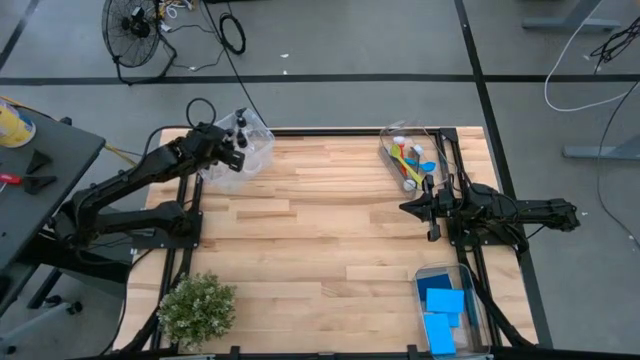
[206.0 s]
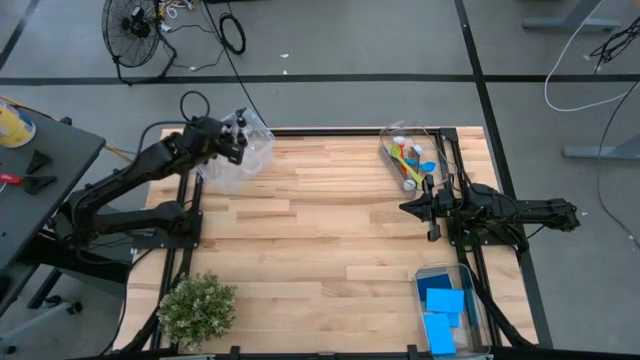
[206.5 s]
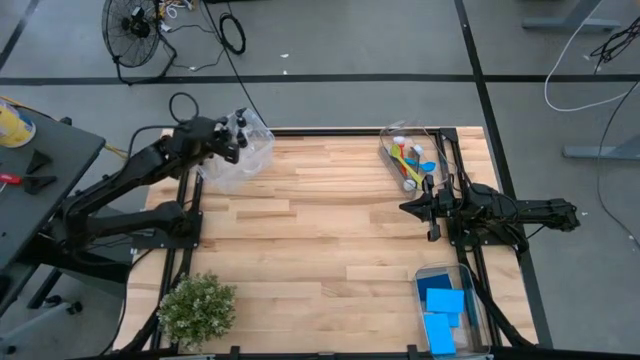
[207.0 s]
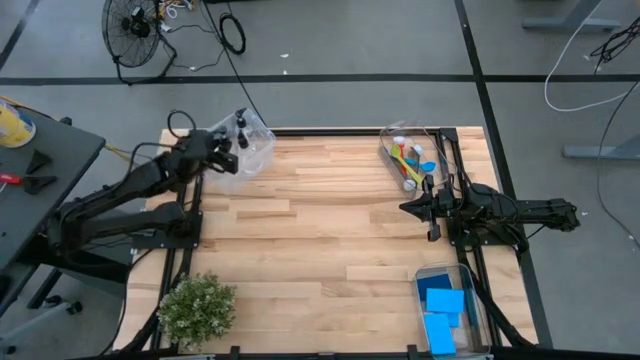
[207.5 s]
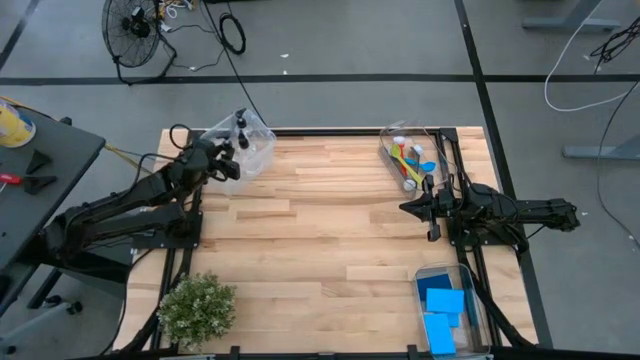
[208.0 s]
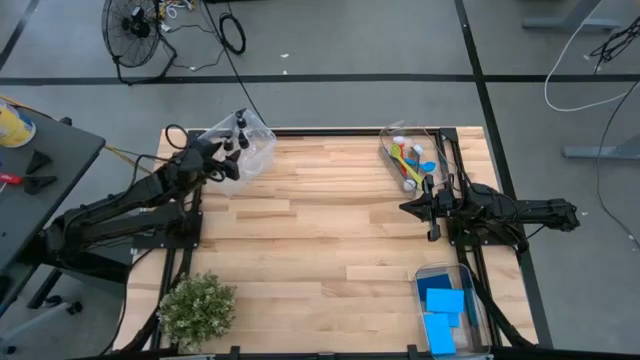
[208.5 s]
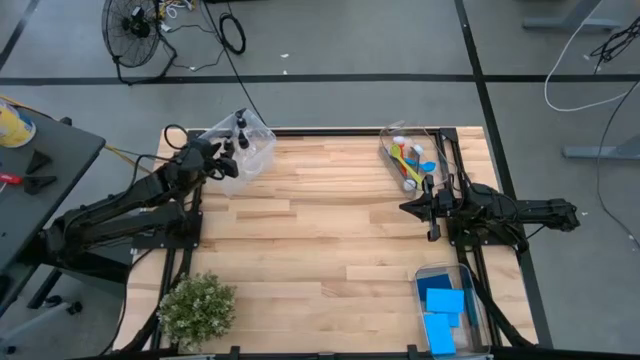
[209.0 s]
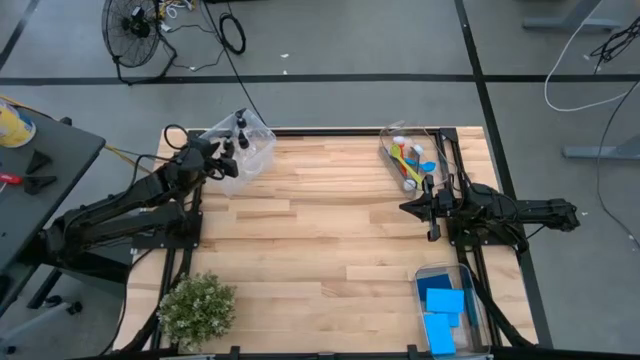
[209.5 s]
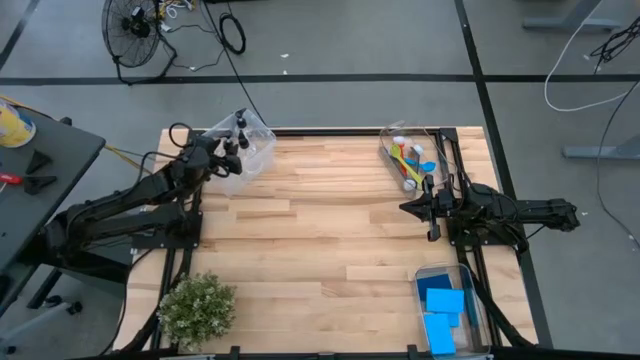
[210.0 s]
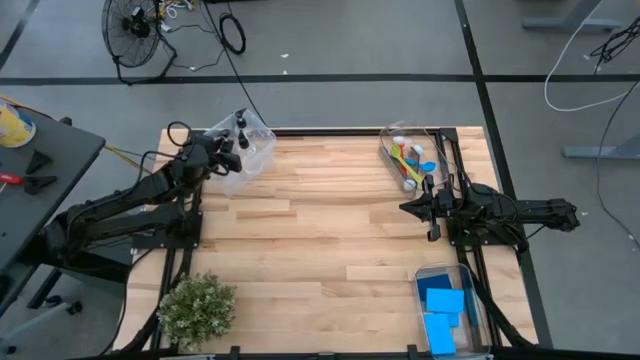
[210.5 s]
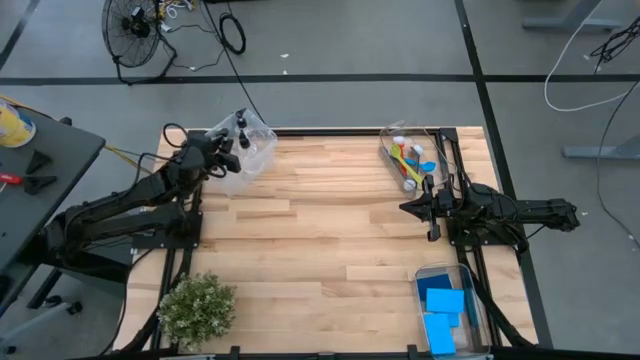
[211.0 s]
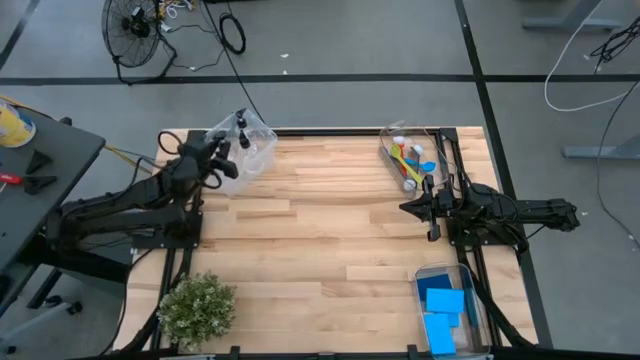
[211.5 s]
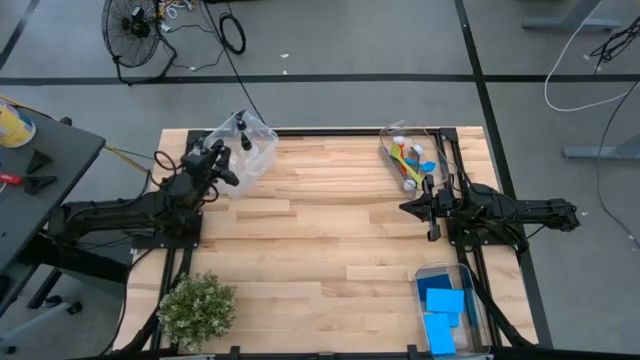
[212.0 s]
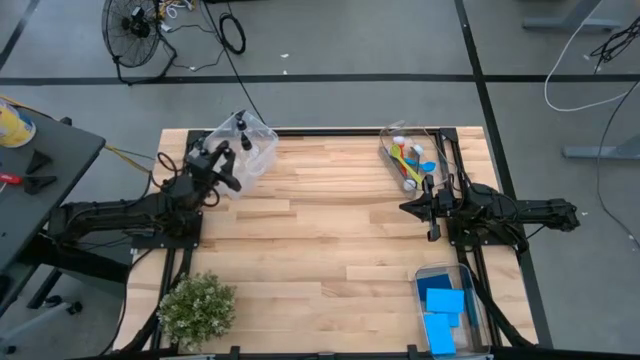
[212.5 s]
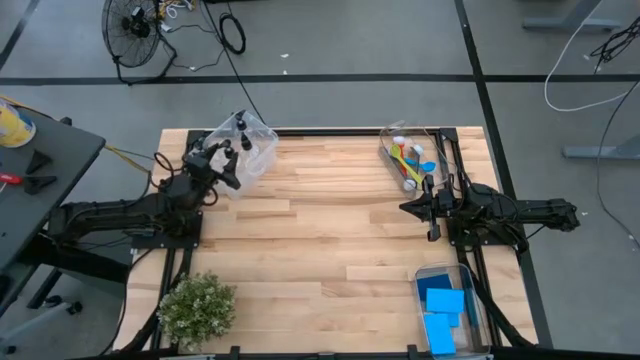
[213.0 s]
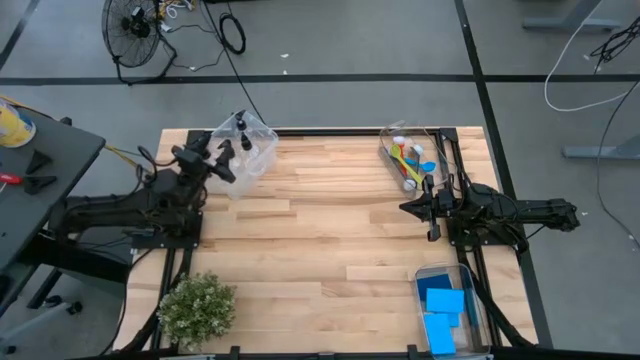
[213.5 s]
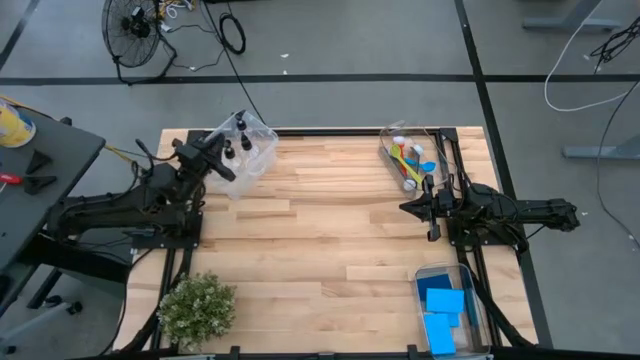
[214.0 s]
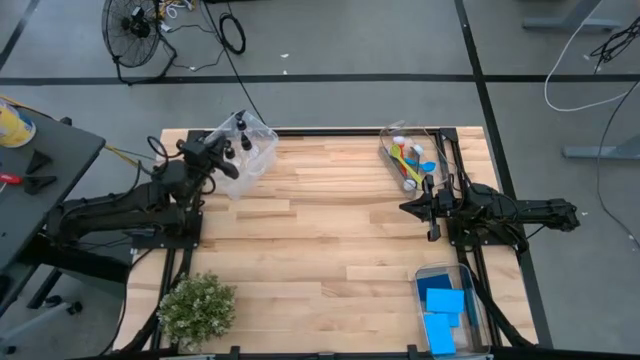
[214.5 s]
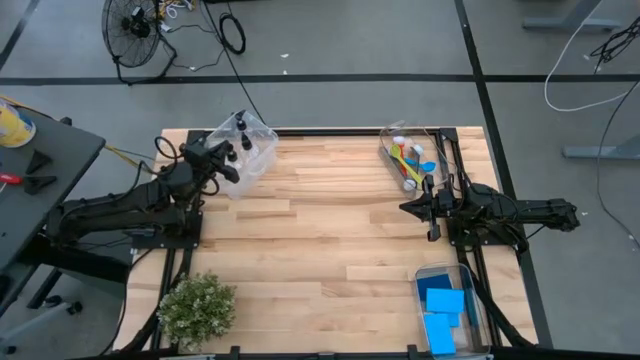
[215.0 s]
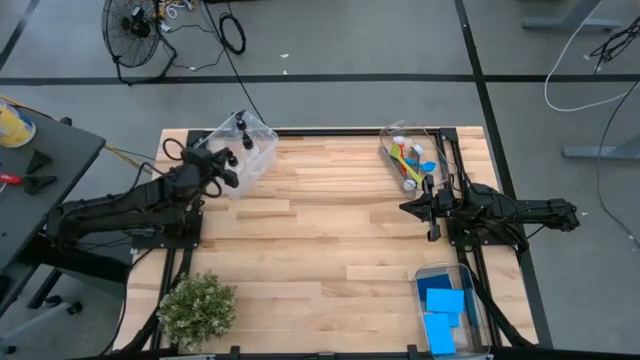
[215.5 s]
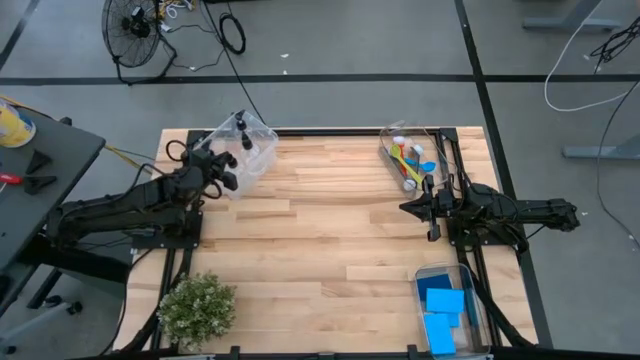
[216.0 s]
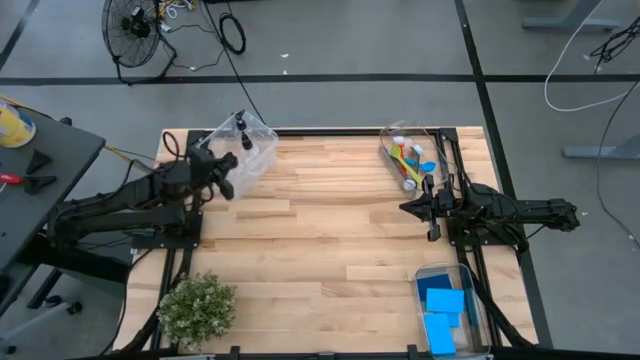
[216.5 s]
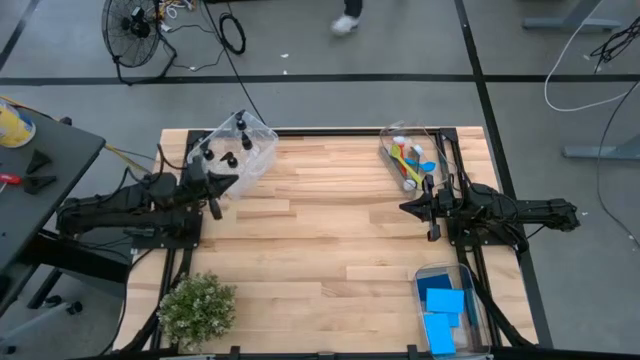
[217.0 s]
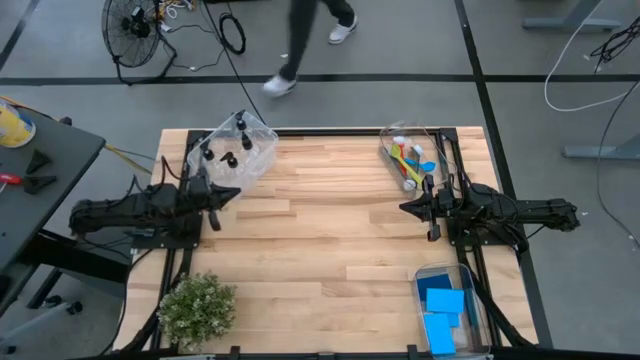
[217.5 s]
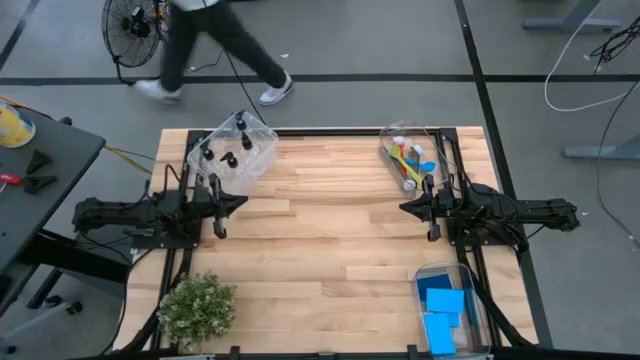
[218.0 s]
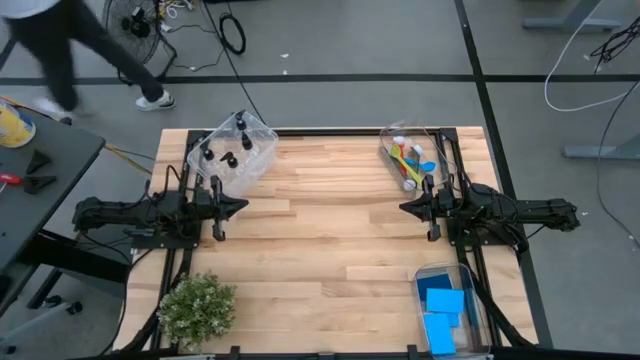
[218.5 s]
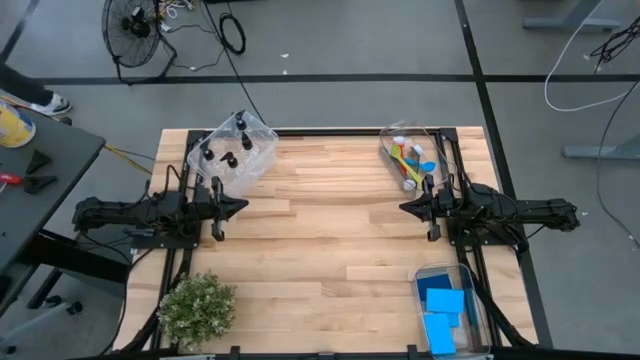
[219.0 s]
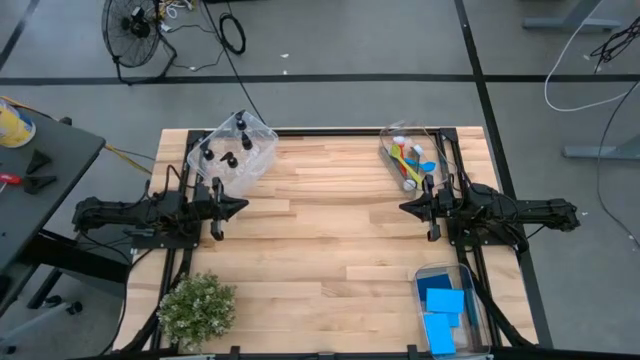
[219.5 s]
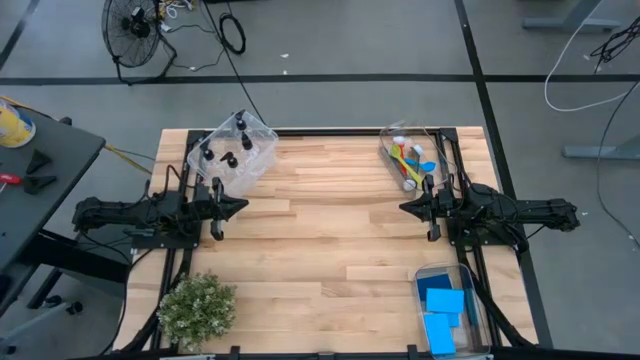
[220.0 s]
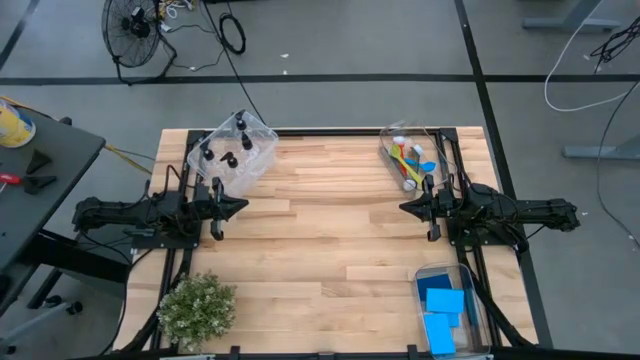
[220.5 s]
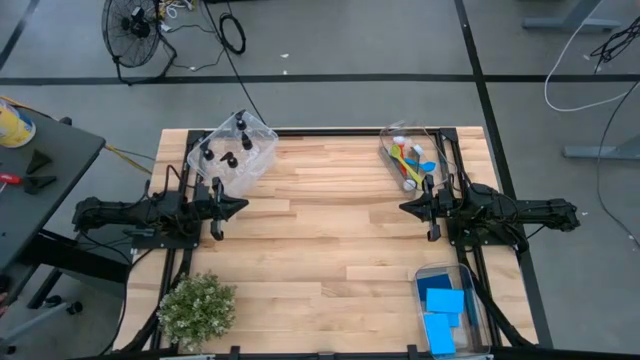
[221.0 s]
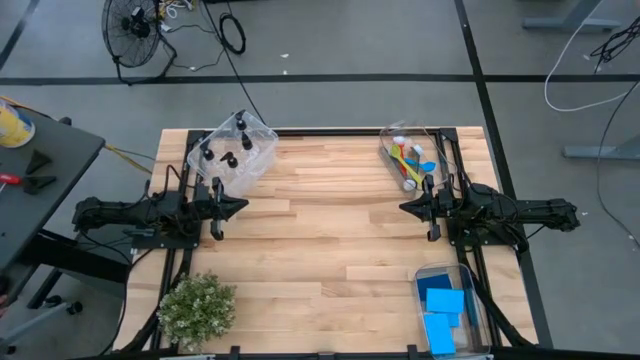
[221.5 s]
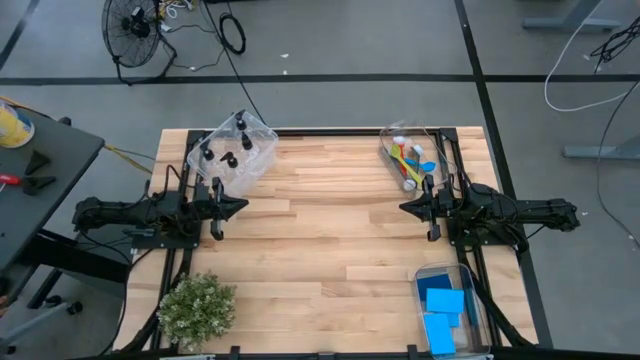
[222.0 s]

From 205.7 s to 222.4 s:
Task: Pick & Place Kitchen Sink Supplies
Return to Home Position

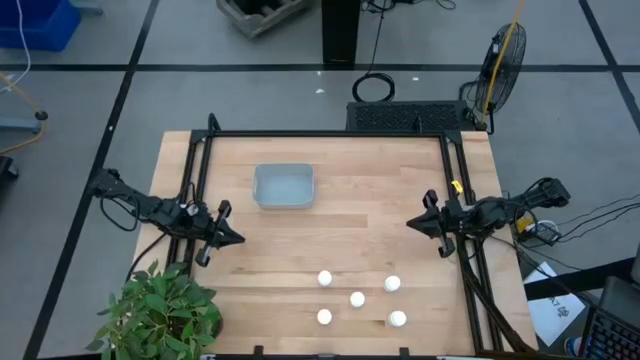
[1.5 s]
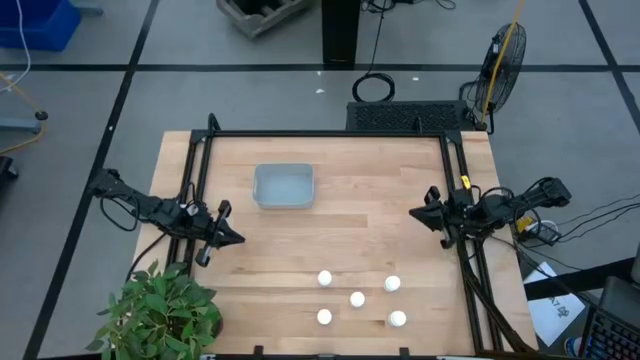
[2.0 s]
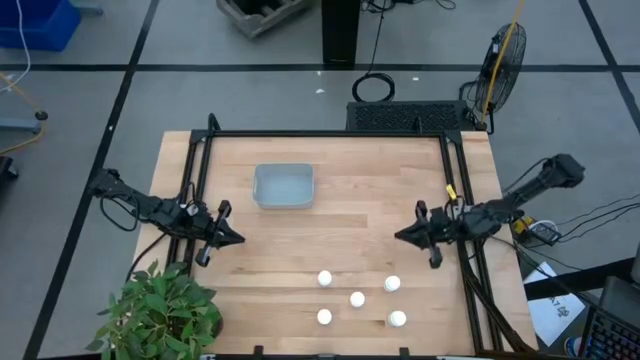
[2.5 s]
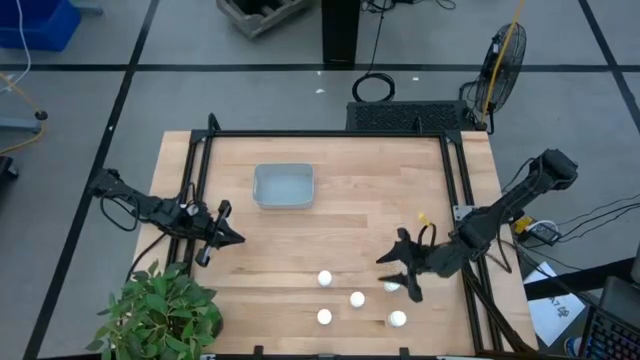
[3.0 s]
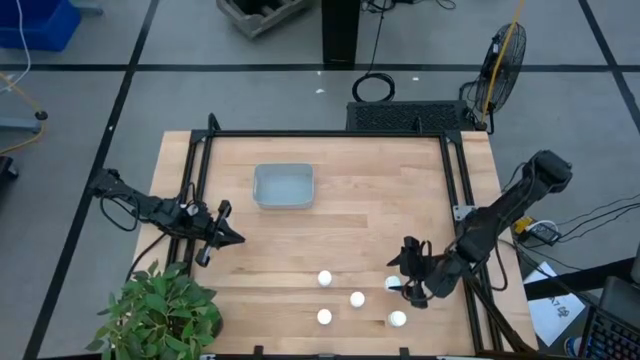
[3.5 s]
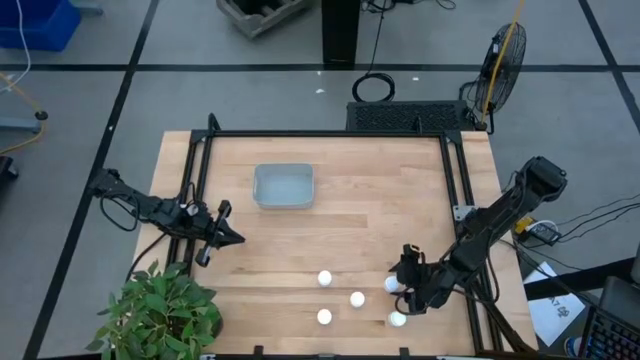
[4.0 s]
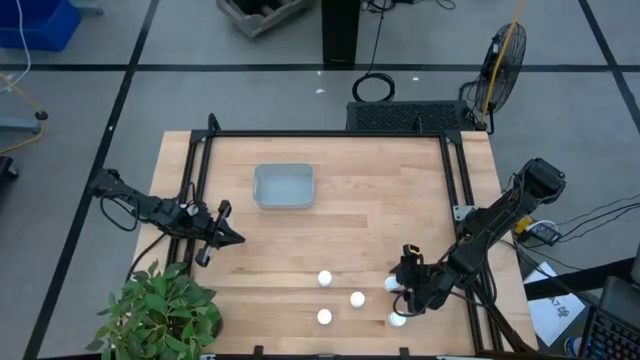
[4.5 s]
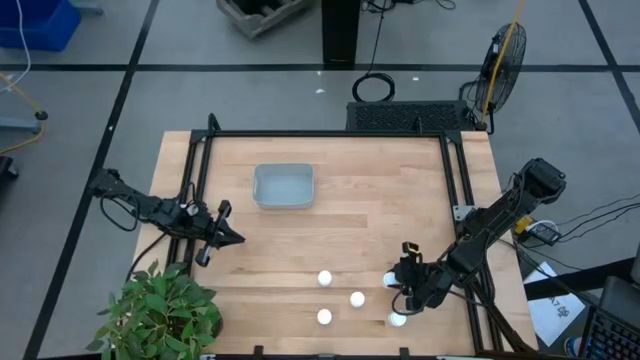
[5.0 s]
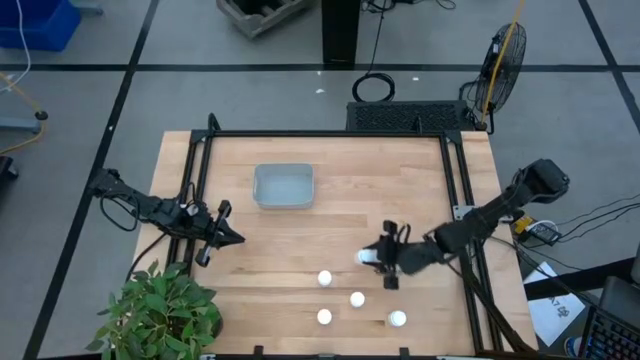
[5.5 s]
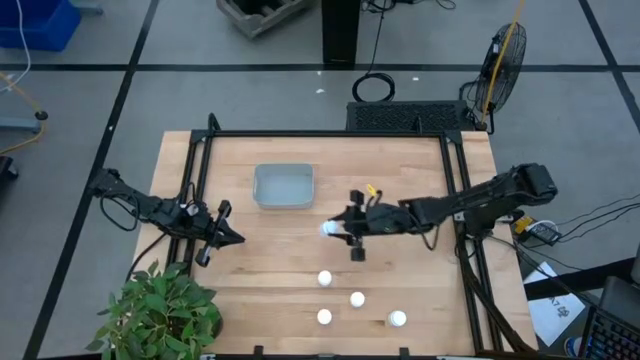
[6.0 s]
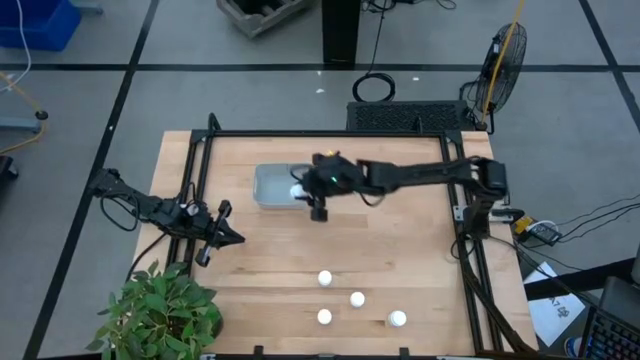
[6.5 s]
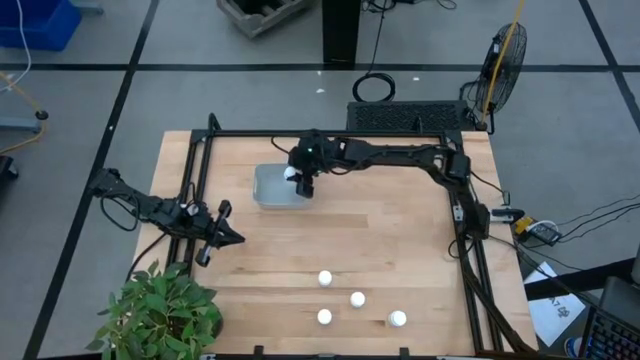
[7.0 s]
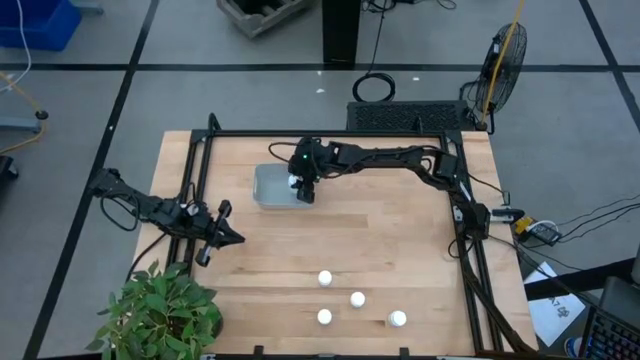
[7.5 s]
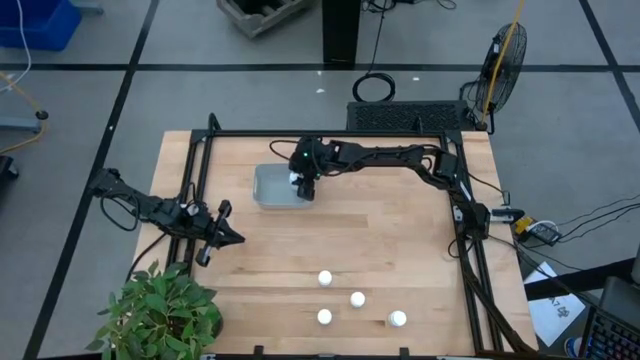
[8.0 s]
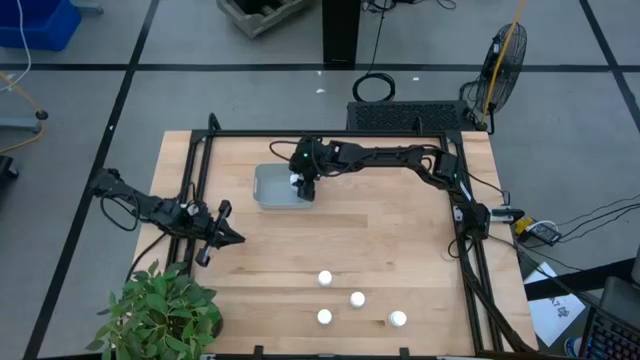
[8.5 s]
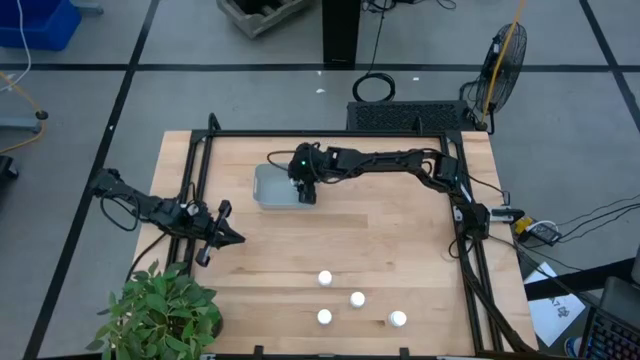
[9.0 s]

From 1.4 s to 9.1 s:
Task: Pick and place pill bottles into a basket
Put the white medicine bottle into the gray basket
